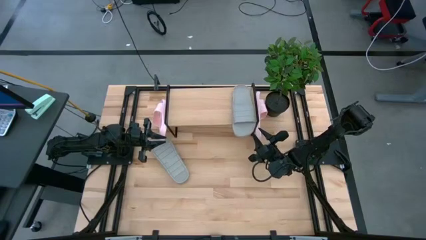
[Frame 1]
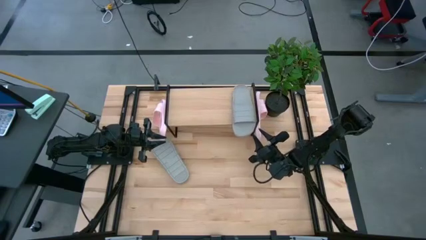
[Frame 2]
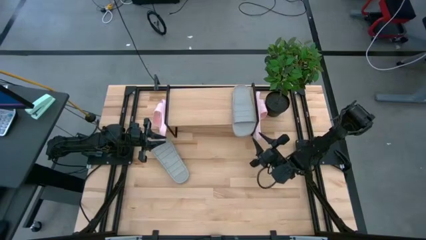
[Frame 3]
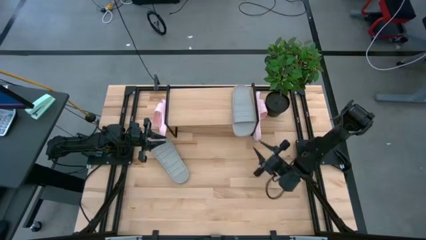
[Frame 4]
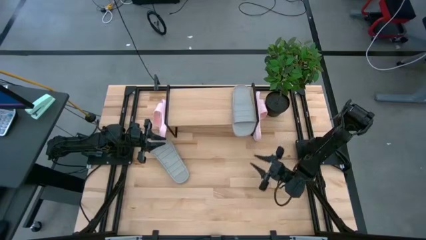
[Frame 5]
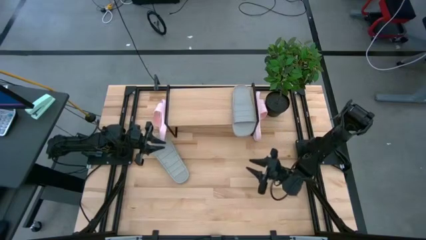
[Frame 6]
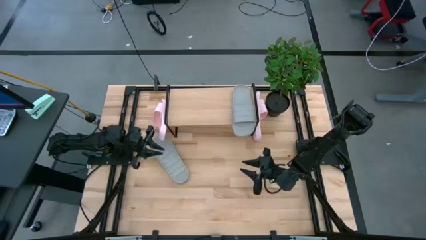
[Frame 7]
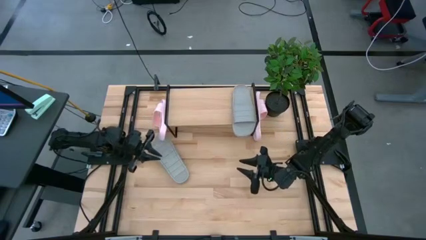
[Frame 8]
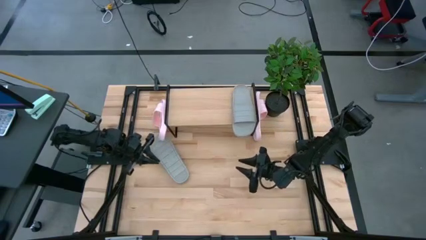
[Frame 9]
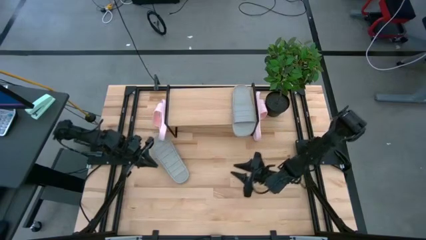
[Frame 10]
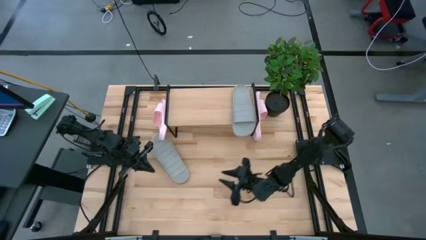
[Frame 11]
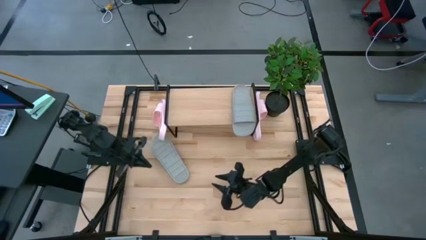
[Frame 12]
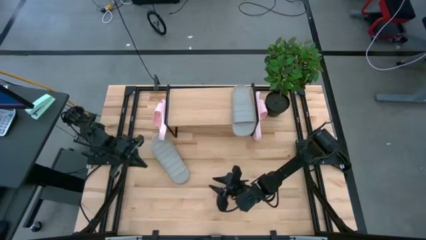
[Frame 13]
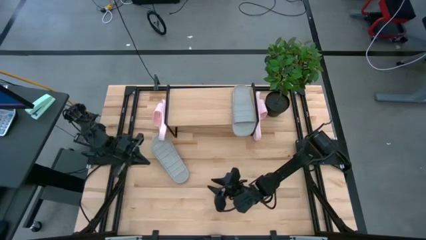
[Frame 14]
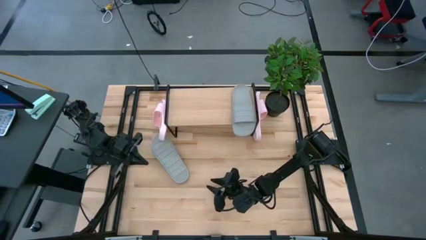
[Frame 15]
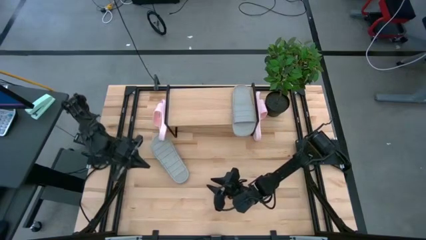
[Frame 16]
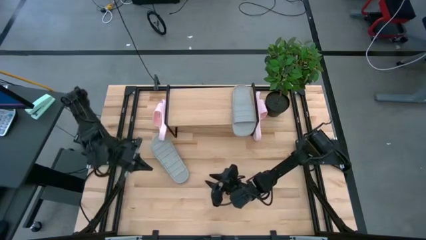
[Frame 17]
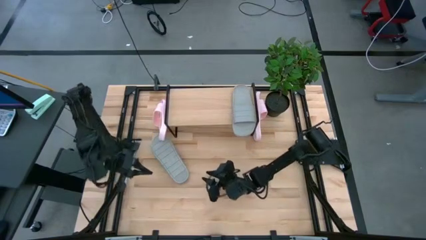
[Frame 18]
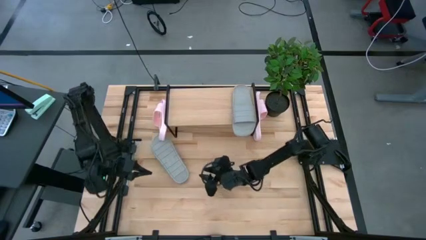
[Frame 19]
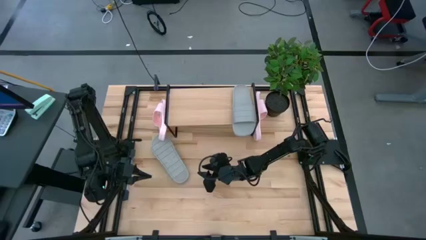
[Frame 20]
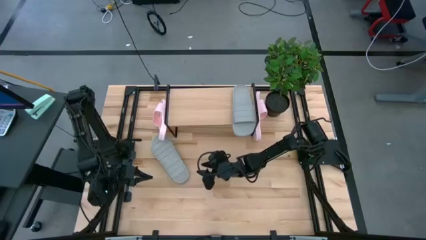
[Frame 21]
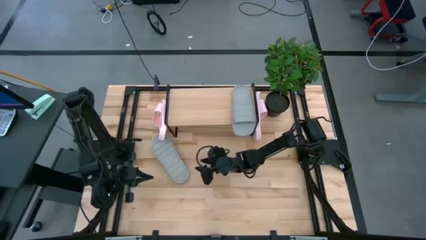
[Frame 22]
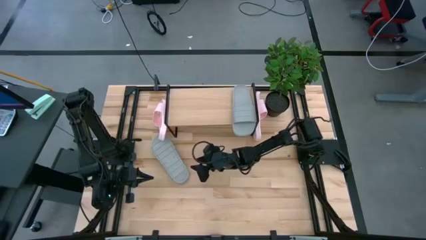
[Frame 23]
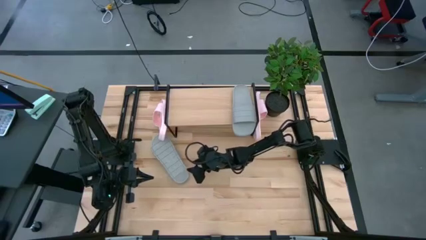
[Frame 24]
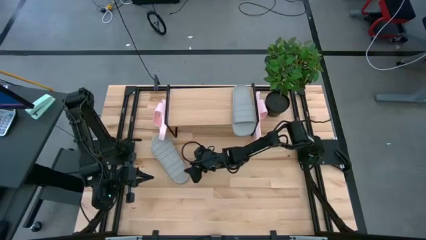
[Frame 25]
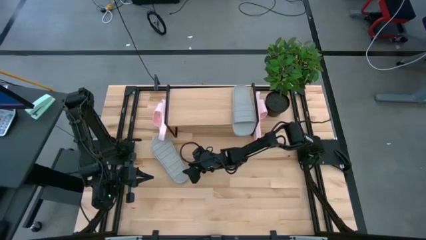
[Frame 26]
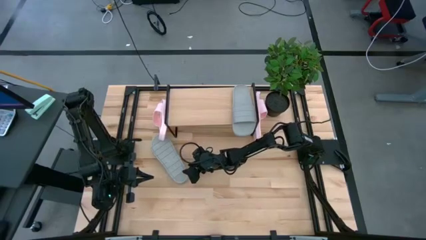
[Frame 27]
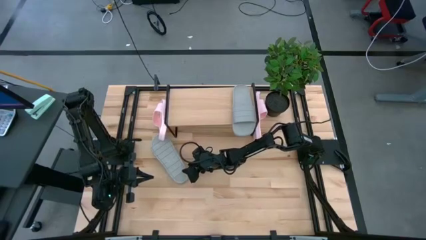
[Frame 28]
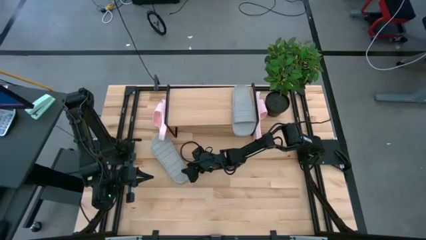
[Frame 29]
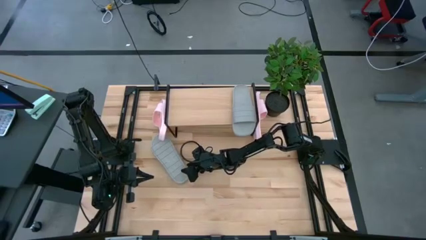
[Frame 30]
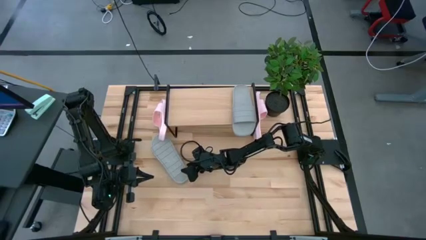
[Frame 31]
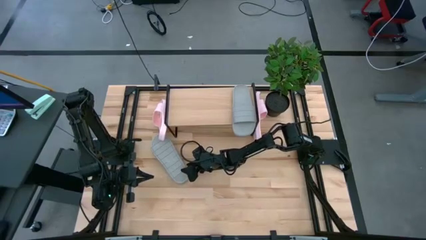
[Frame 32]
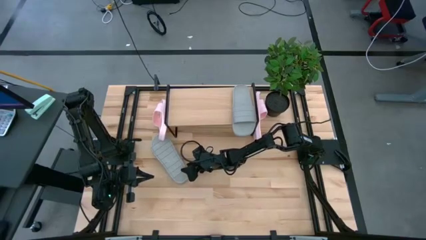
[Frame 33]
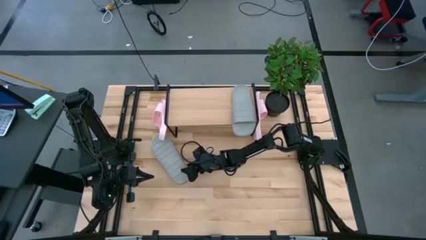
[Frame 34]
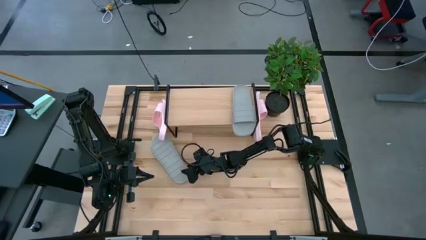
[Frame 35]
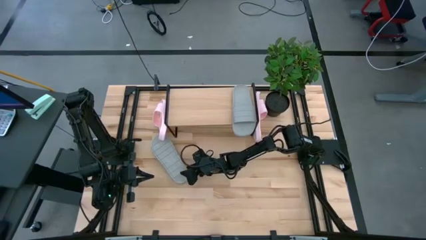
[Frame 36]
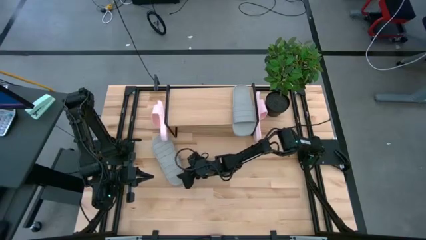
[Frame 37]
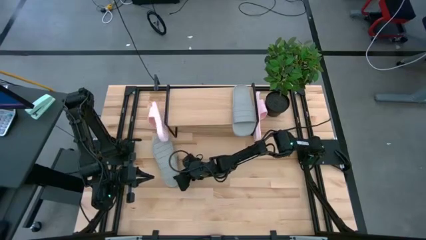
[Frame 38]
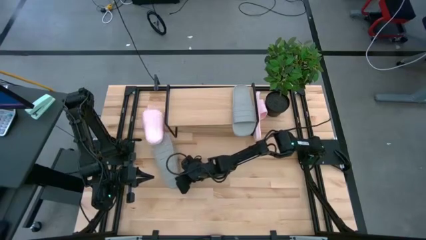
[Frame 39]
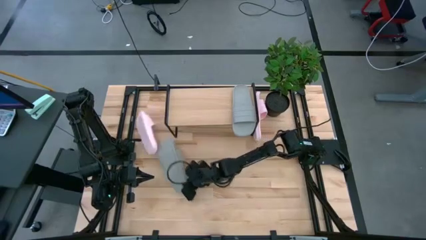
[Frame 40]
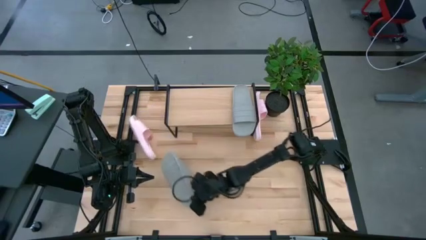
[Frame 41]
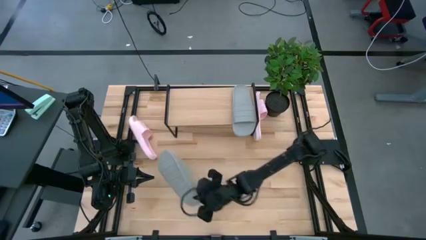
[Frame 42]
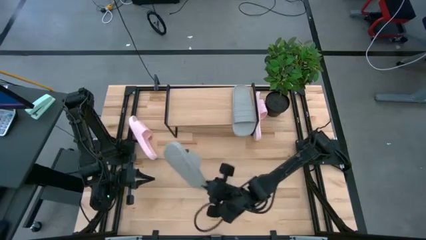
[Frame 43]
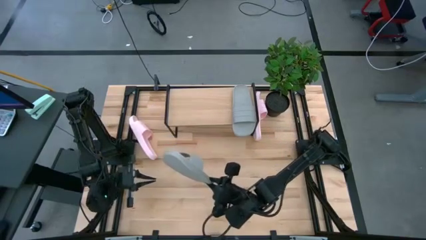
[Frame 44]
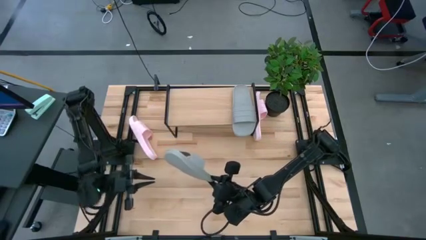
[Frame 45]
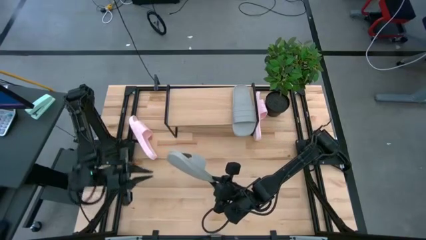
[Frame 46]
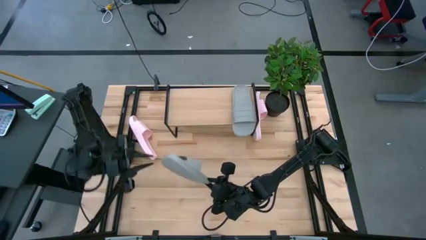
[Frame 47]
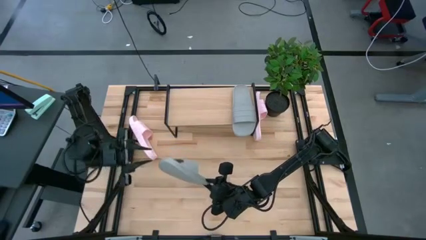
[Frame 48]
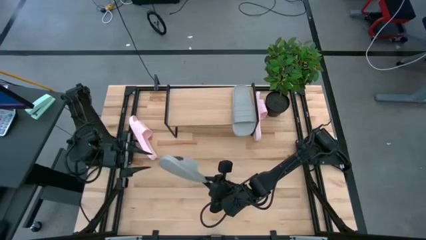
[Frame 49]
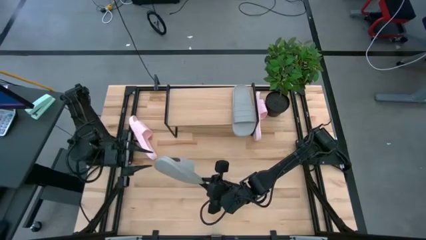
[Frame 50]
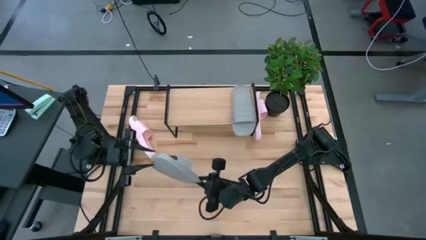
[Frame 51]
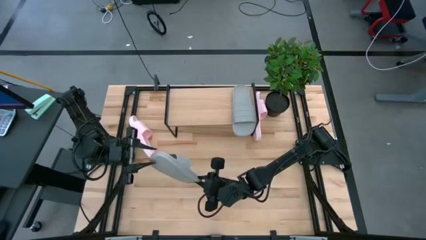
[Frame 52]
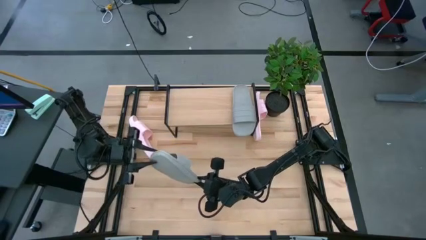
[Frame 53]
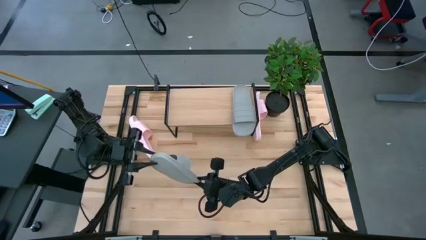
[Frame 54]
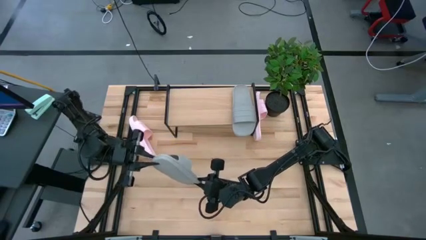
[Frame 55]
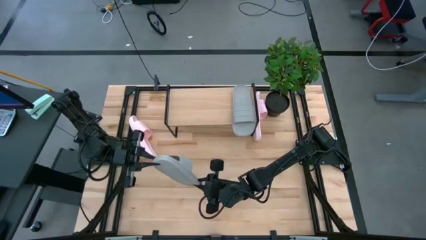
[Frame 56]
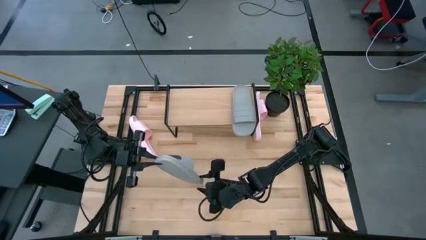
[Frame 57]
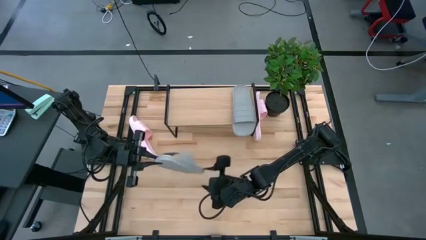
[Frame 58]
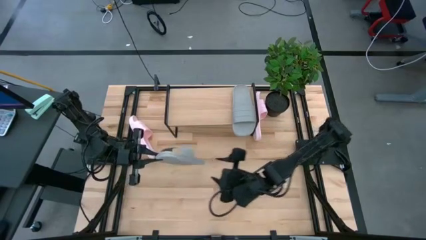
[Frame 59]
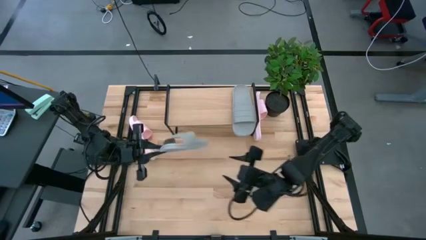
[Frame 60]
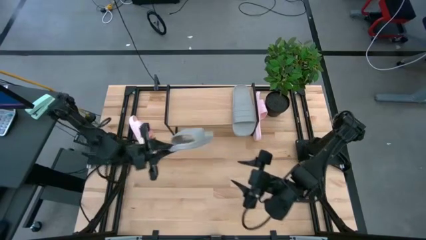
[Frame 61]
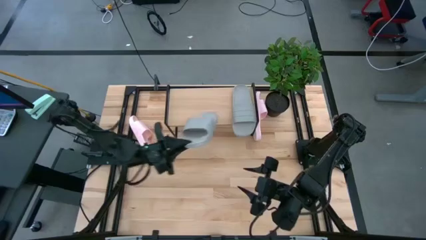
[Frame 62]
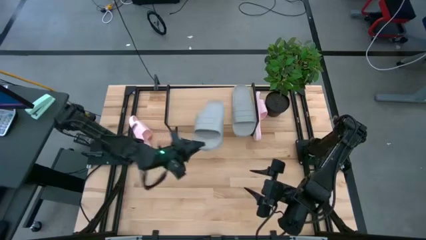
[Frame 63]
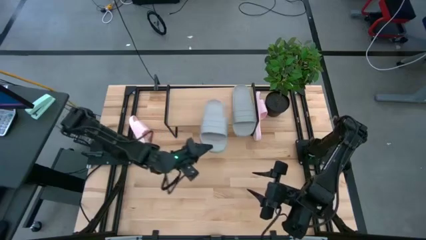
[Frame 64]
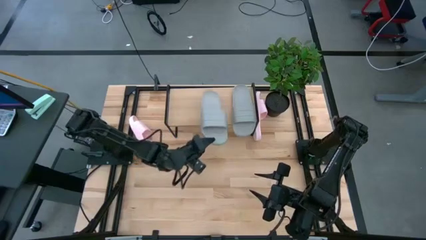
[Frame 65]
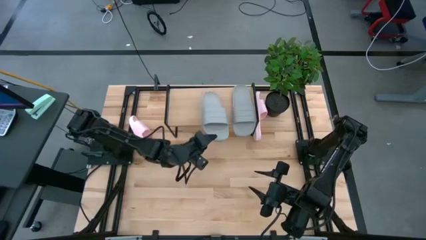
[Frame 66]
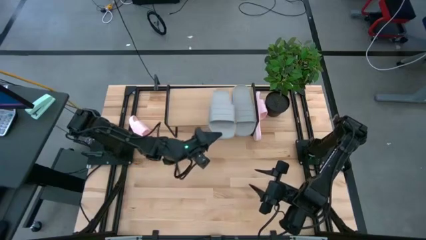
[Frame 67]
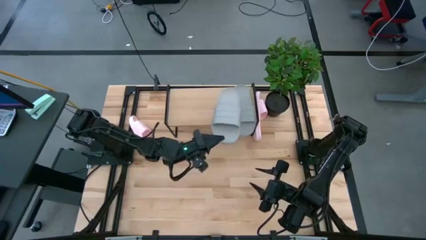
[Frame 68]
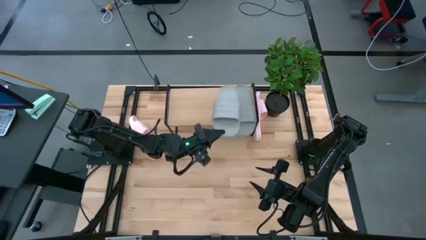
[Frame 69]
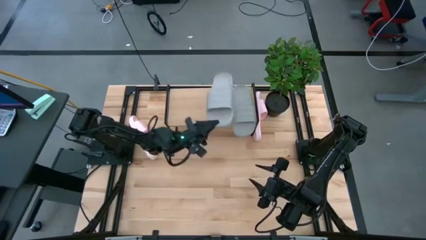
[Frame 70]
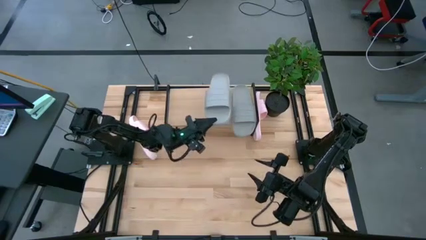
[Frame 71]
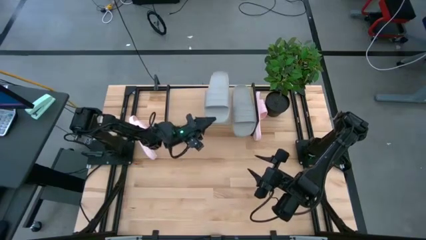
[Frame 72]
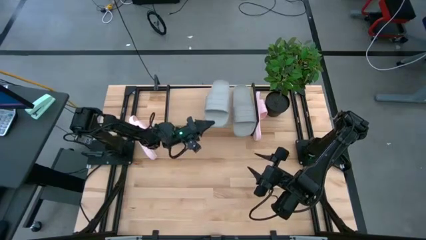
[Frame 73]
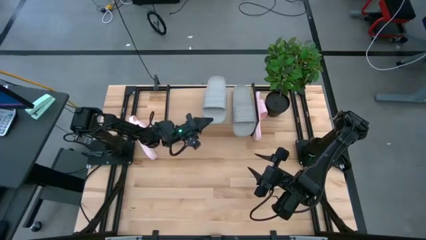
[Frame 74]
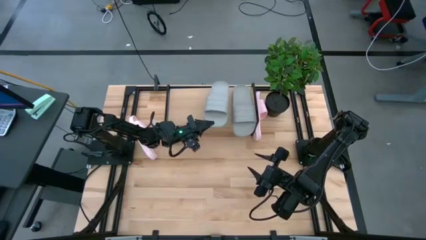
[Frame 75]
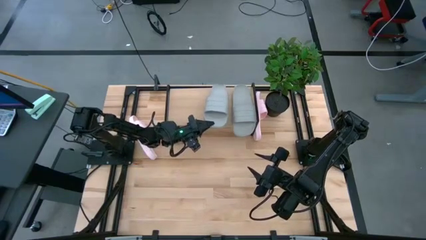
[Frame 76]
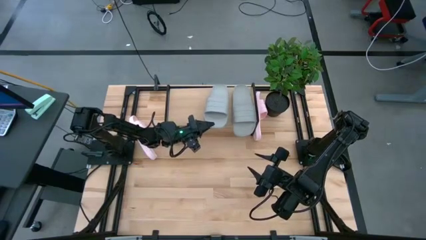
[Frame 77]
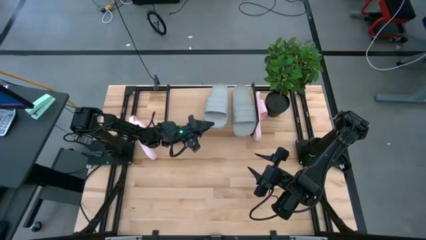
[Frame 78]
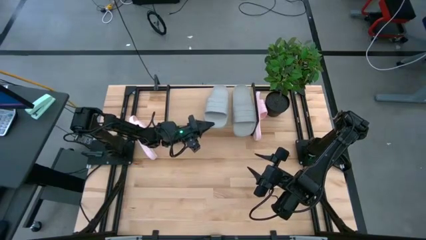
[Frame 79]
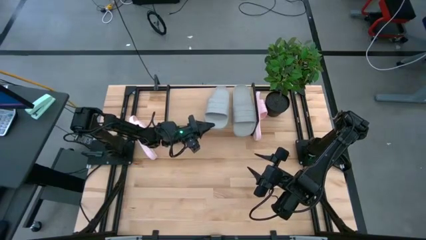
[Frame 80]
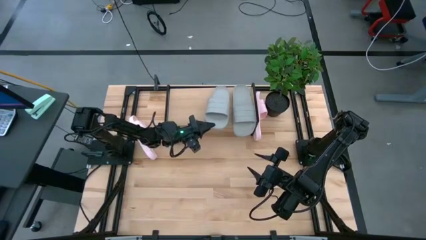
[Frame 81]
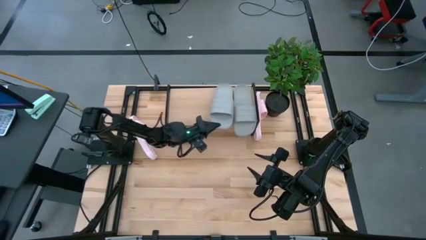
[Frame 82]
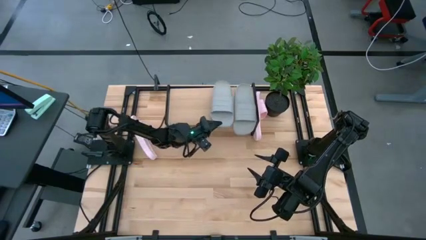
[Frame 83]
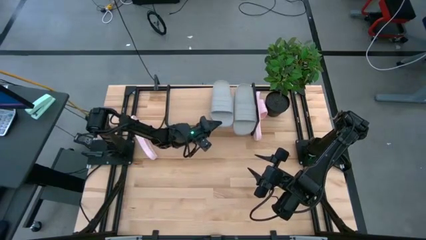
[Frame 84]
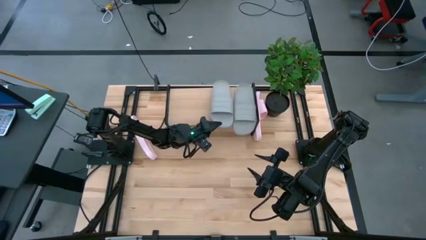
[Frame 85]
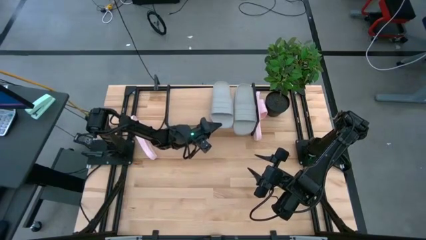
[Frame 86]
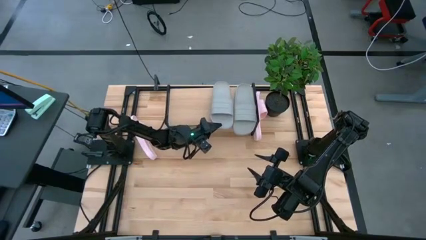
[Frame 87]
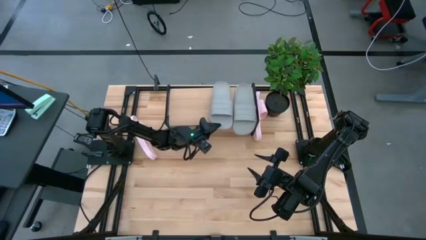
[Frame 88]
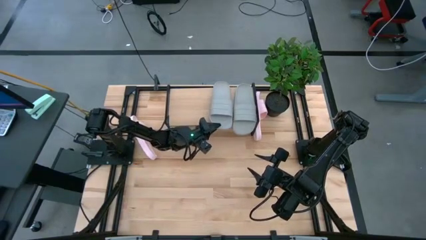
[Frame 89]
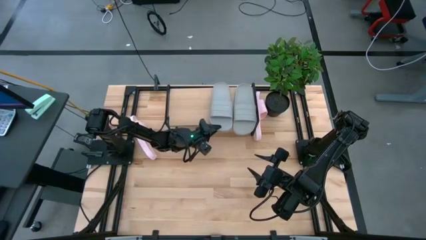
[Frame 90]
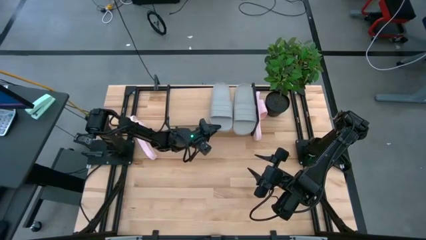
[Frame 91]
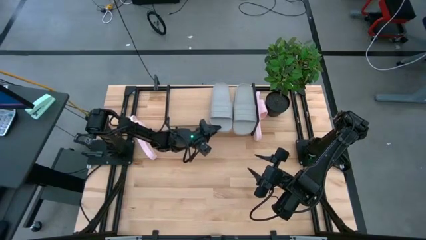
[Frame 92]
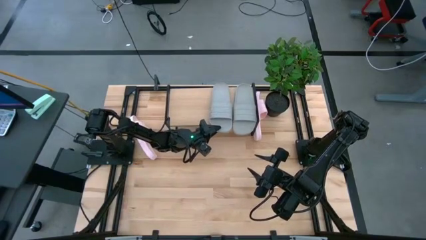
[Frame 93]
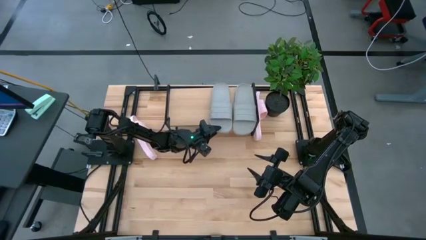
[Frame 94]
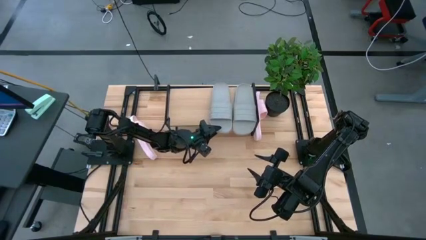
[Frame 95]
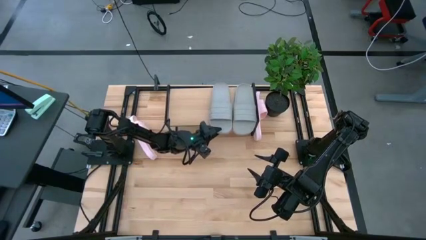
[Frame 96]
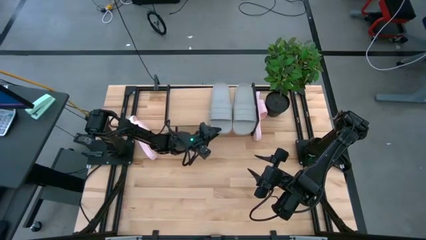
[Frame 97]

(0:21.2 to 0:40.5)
Task: Pick and place slides into the shelf
Put the grey slide onto the shelf
